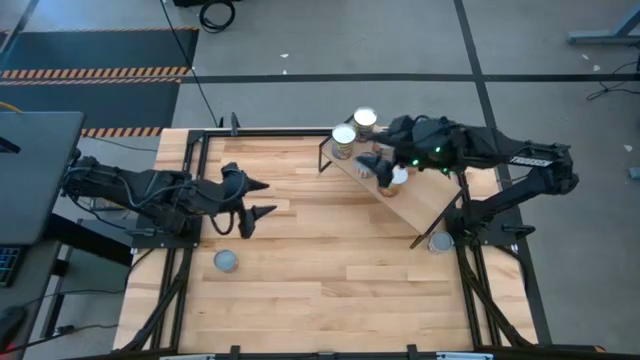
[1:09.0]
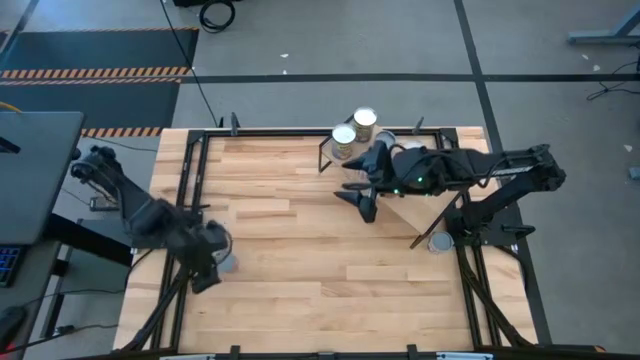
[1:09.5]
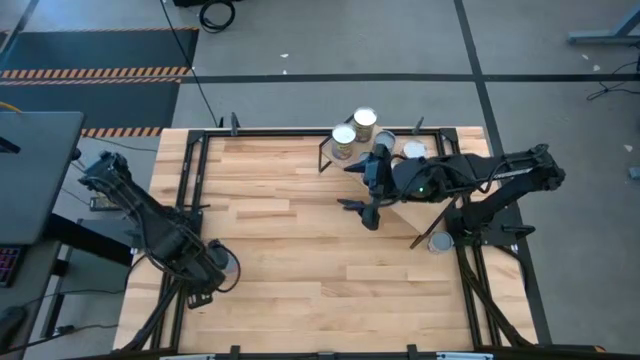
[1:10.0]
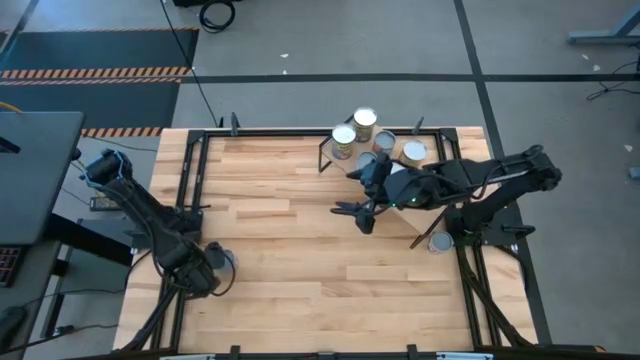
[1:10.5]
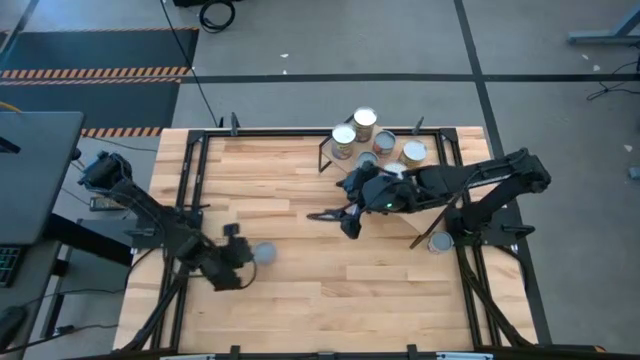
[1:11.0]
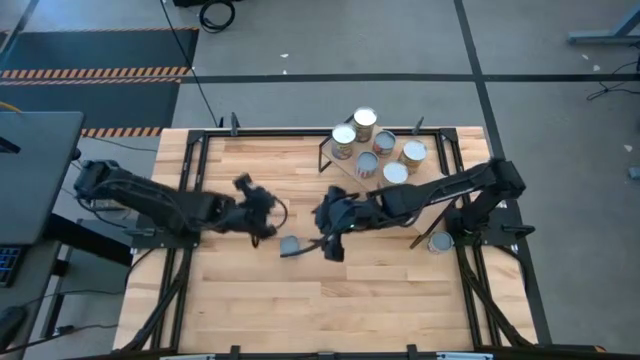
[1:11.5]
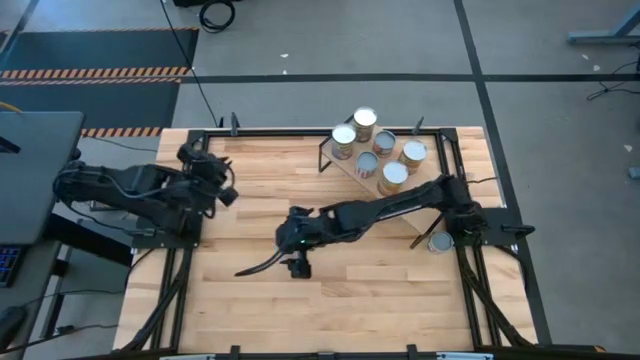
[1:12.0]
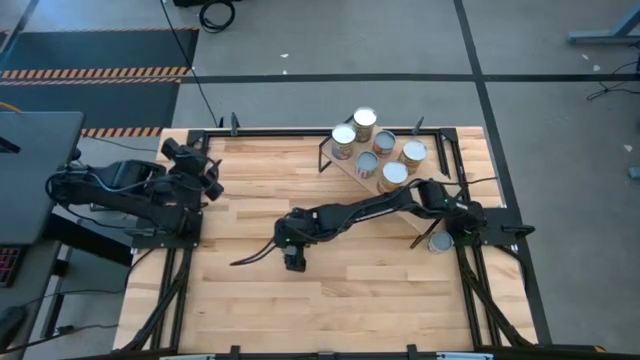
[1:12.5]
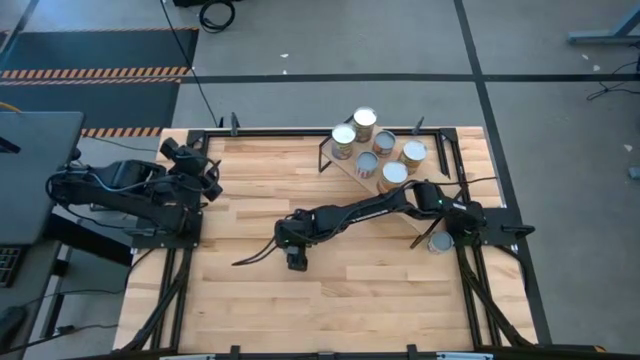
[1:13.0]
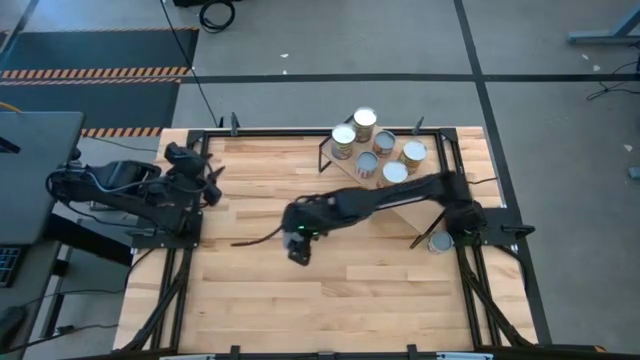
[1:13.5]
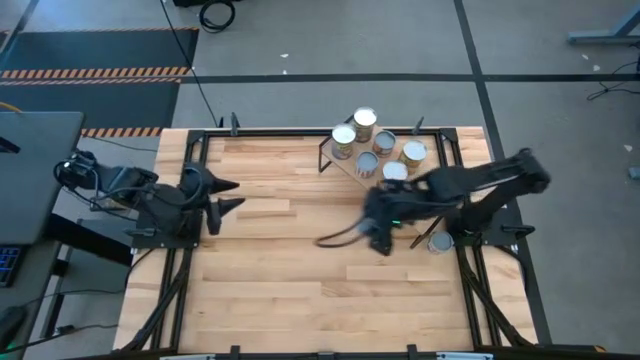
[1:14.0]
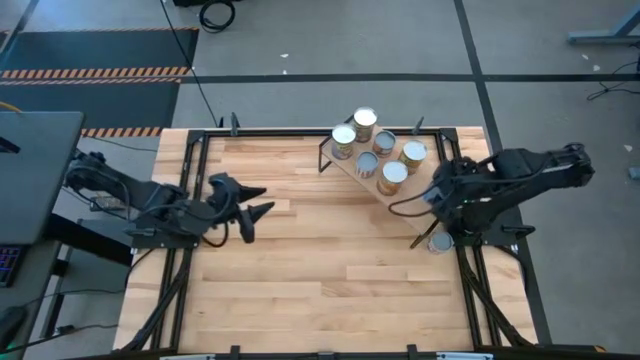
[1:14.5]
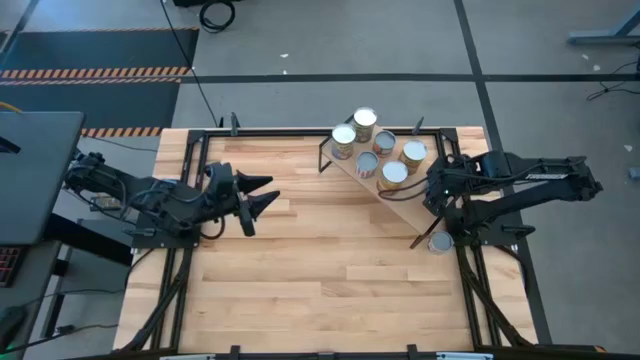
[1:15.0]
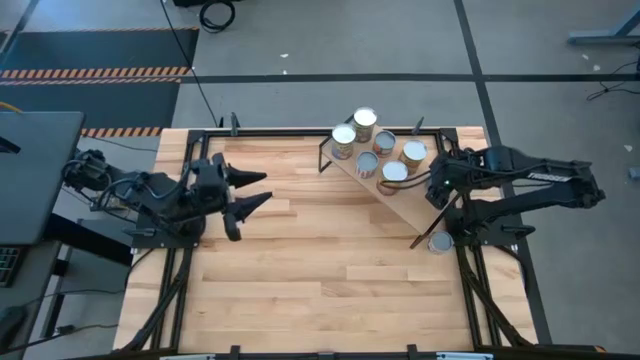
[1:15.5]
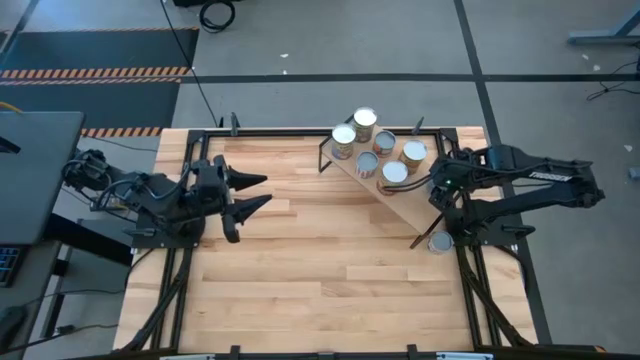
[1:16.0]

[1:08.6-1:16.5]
Task: Pick and place cans onto a shelf
Put the small canned corn on the shelf

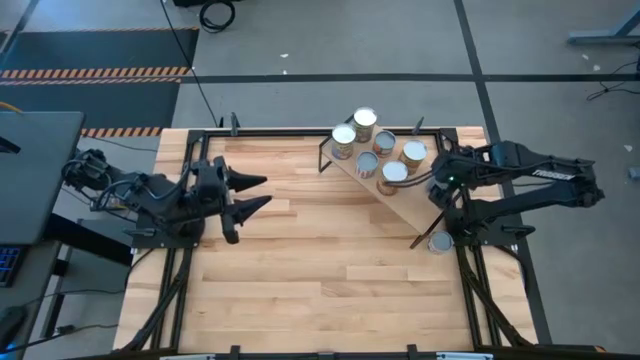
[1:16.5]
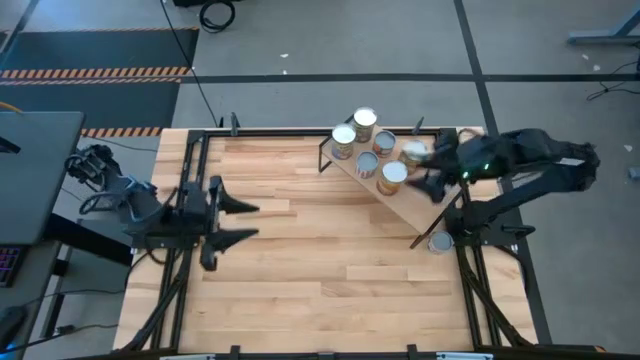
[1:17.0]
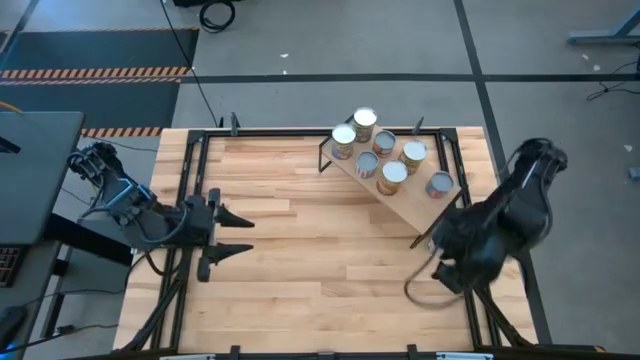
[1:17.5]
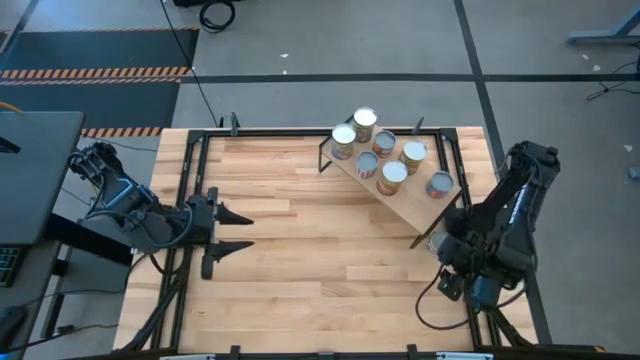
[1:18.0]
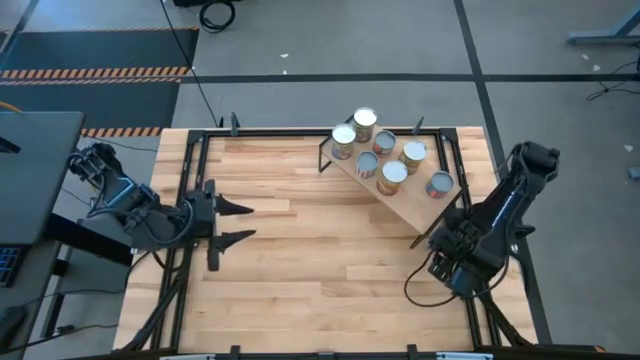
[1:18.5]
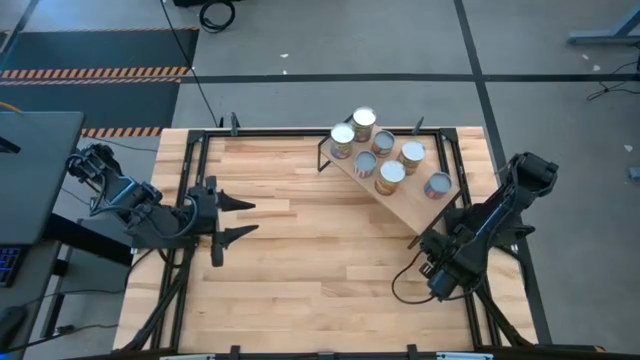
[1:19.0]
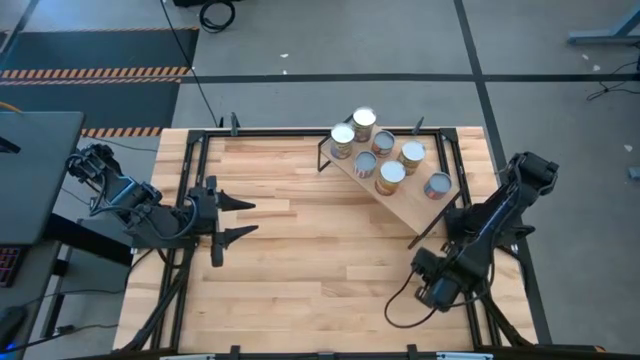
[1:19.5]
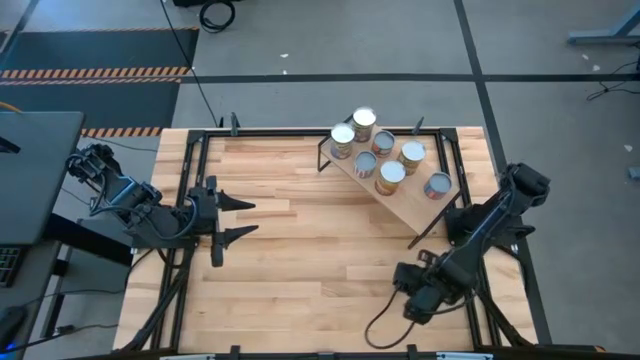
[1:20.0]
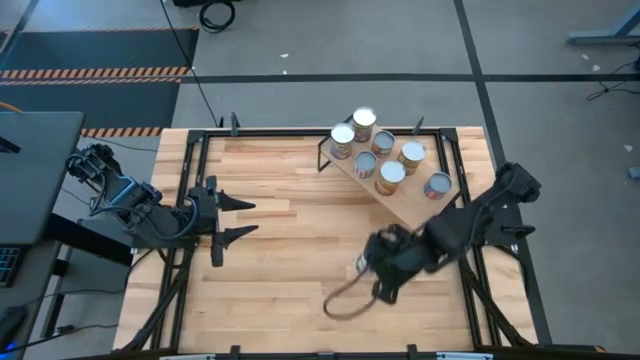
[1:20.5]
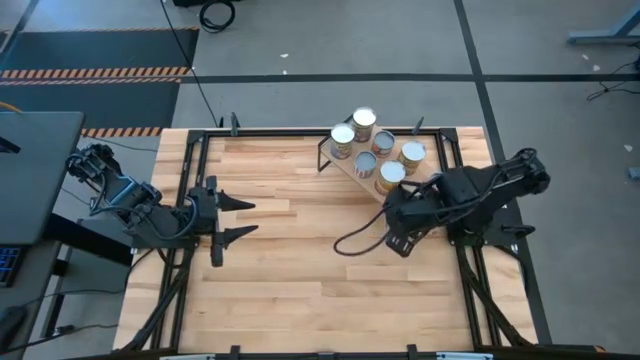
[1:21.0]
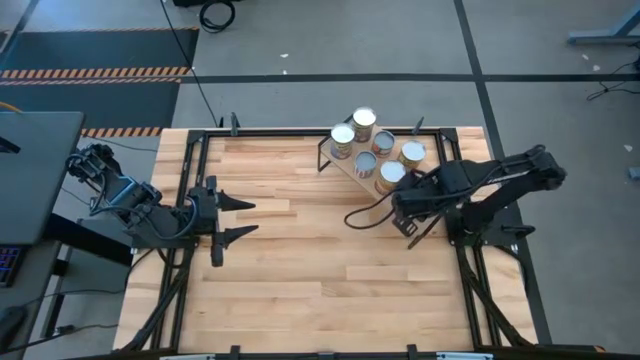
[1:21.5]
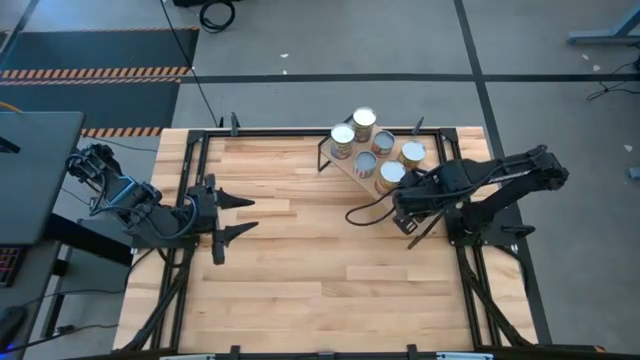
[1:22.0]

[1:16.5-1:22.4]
Put the canned peas on the shelf

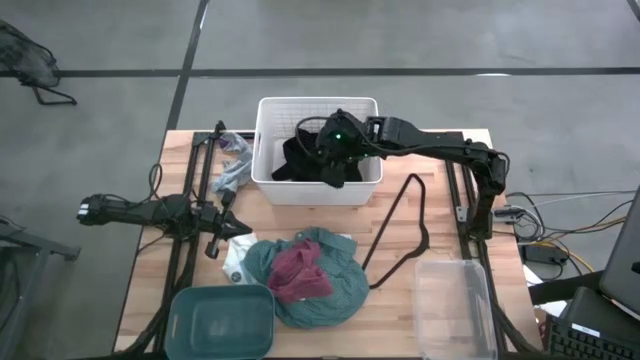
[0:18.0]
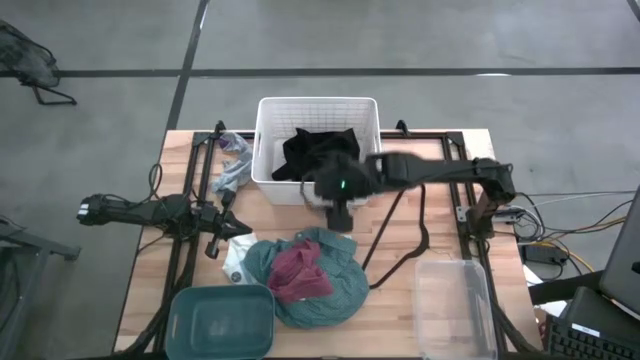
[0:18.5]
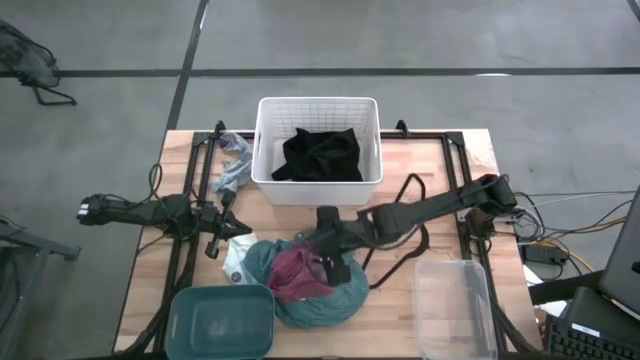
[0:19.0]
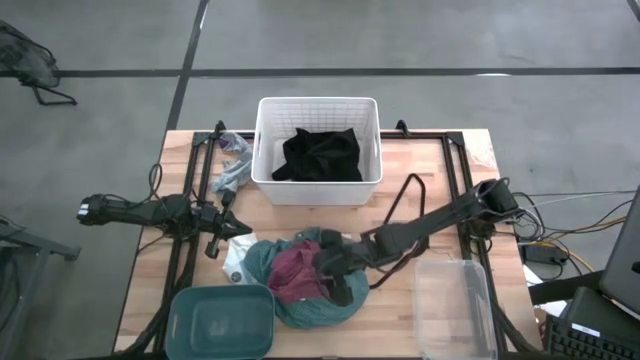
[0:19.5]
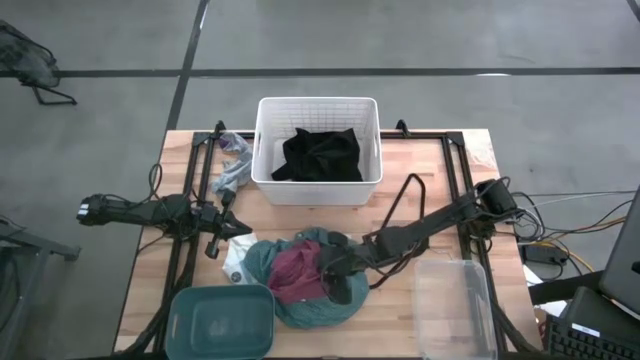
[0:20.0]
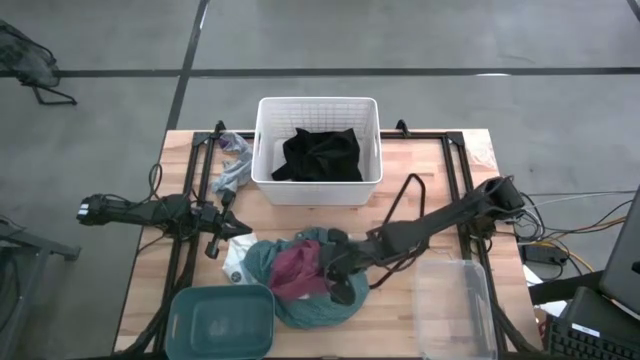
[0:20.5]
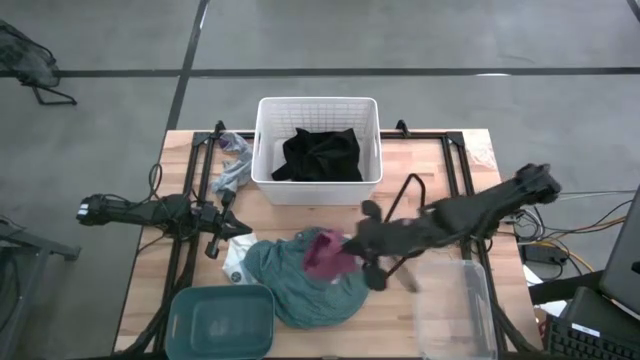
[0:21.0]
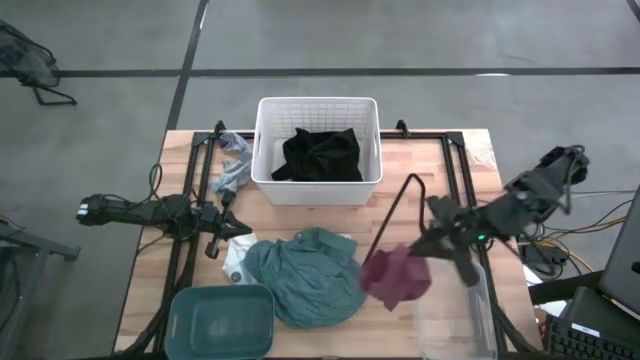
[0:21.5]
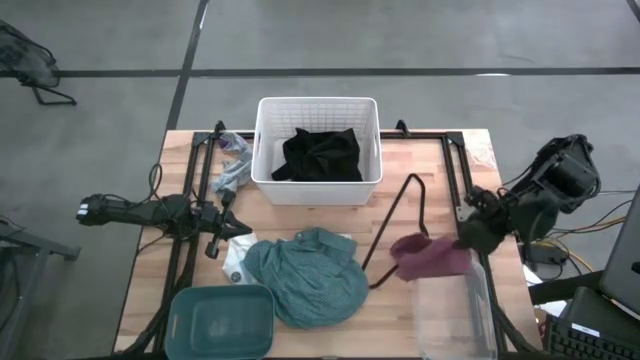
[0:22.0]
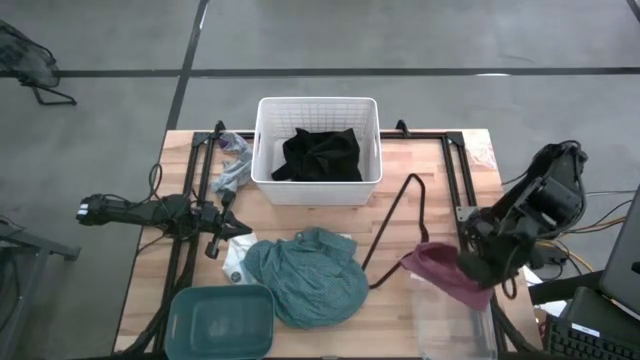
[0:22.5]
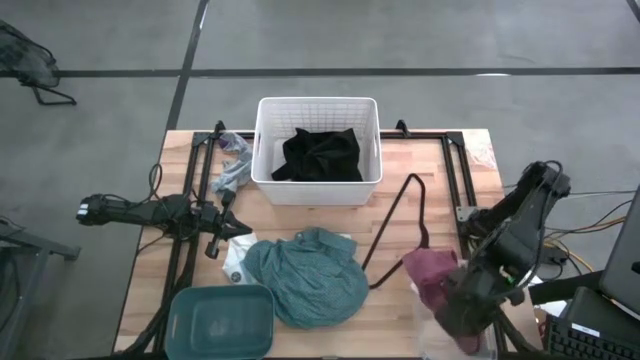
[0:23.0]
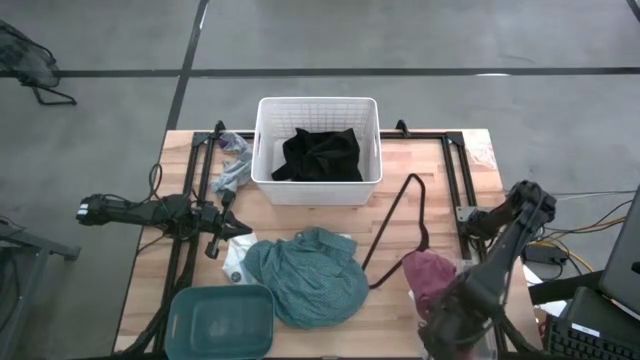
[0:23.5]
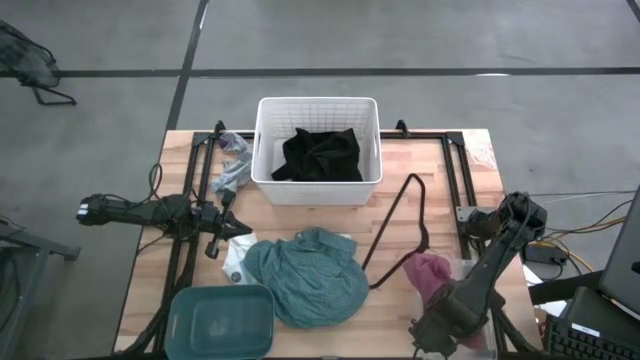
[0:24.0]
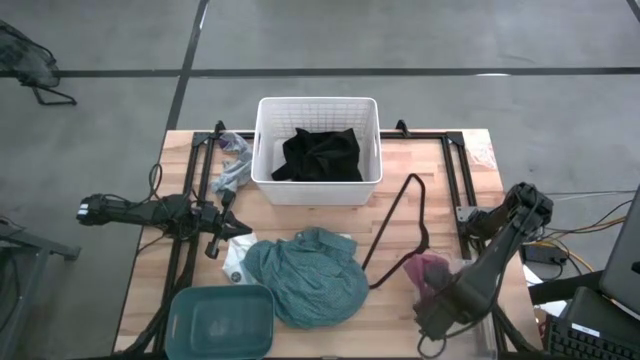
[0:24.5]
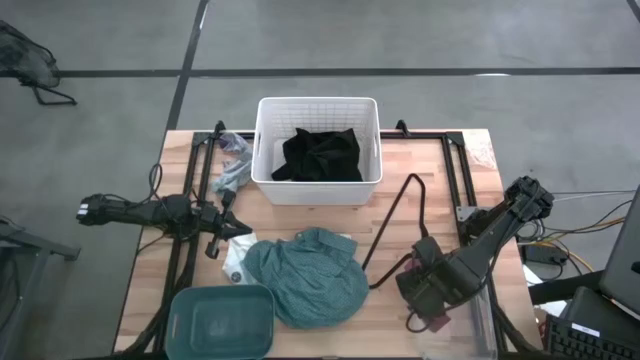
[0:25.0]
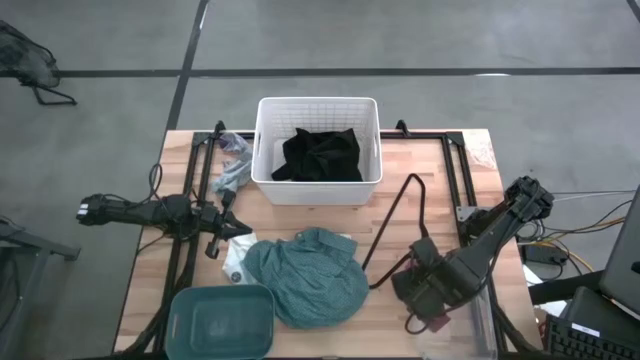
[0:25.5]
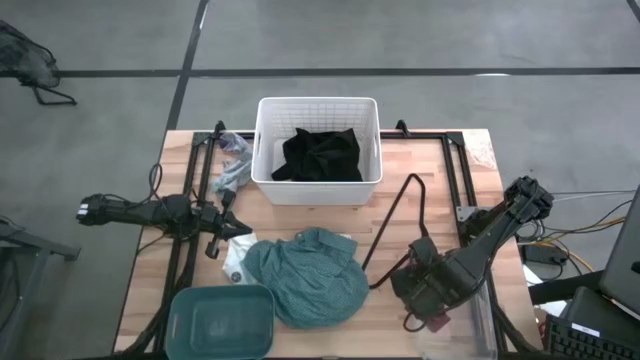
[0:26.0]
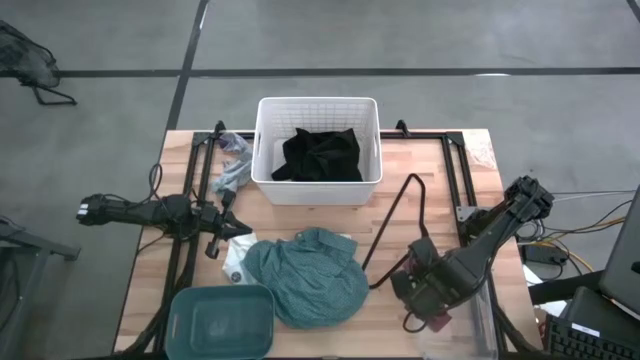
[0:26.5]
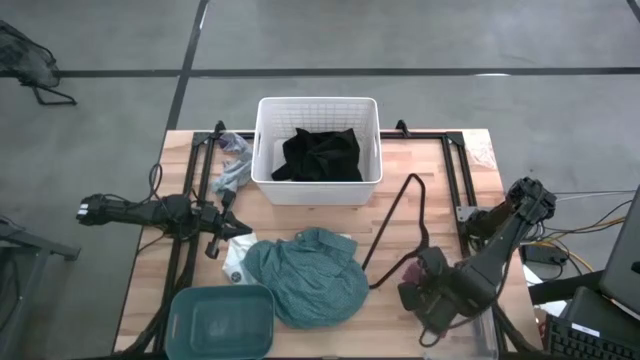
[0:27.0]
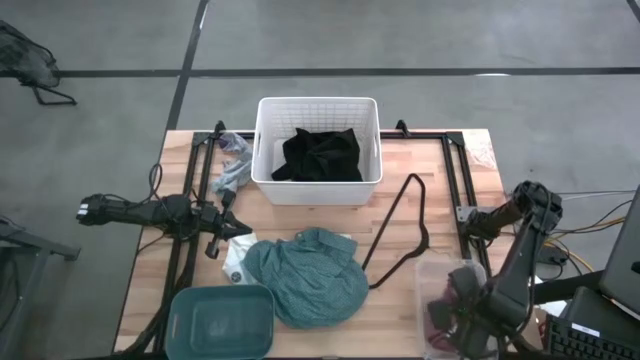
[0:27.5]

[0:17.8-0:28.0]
Task: Pick & Place Cloths
Put the pink underwear into the transparent bin
